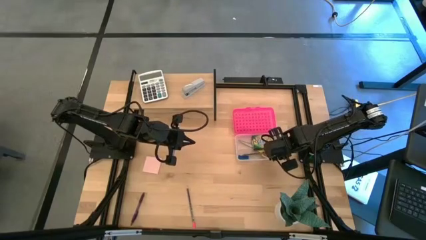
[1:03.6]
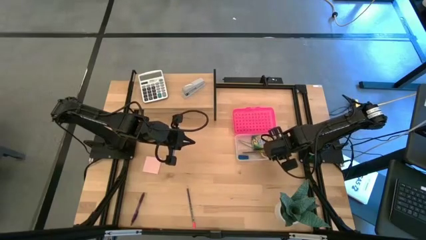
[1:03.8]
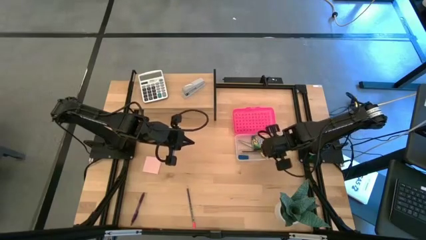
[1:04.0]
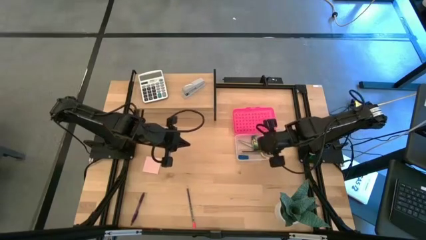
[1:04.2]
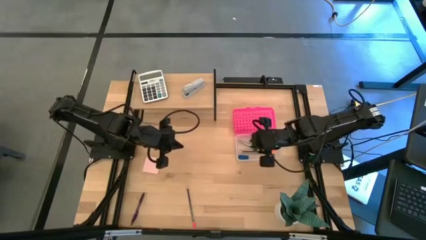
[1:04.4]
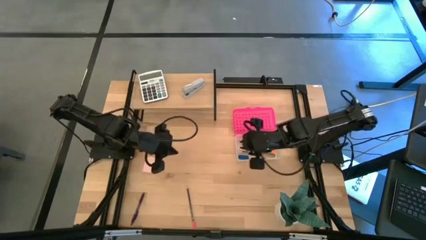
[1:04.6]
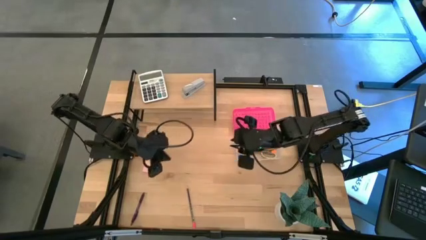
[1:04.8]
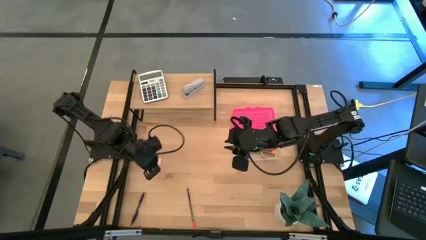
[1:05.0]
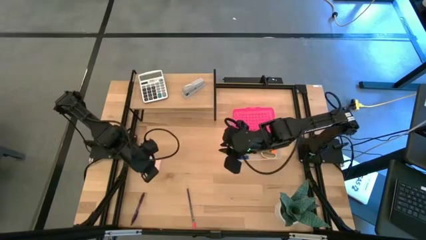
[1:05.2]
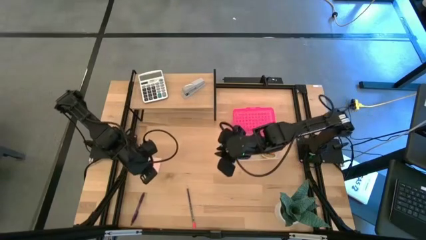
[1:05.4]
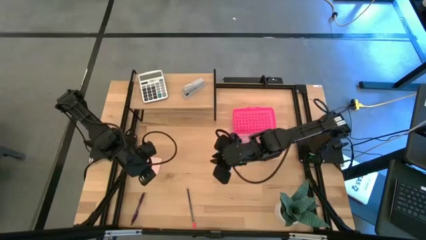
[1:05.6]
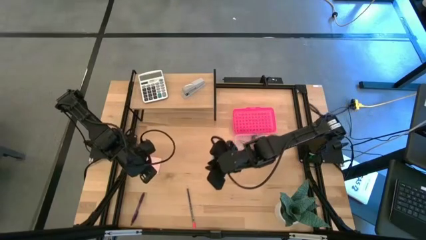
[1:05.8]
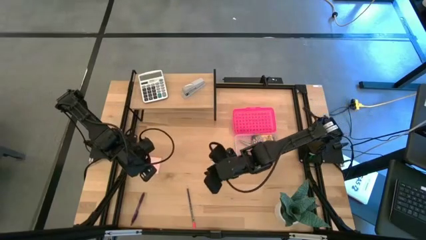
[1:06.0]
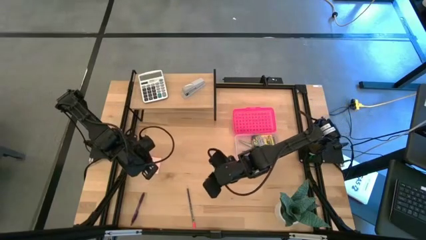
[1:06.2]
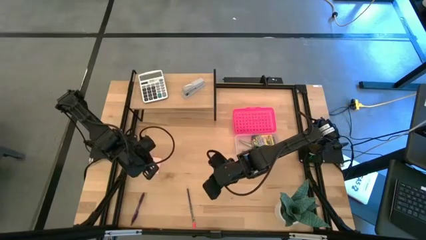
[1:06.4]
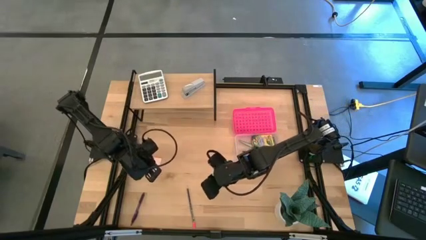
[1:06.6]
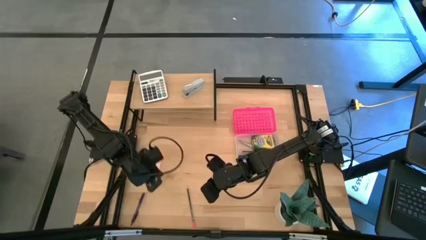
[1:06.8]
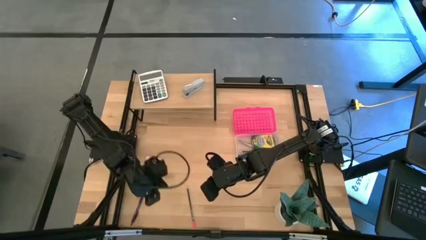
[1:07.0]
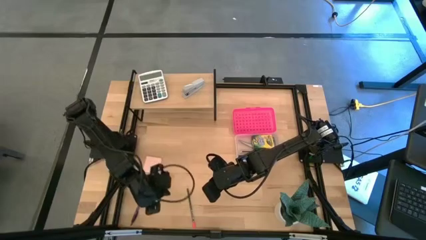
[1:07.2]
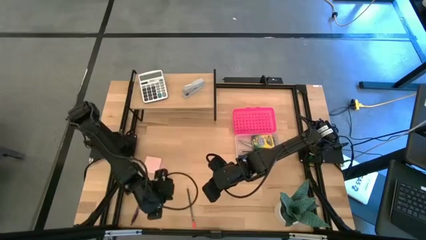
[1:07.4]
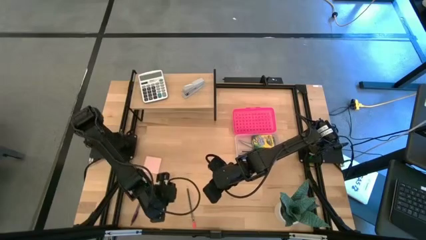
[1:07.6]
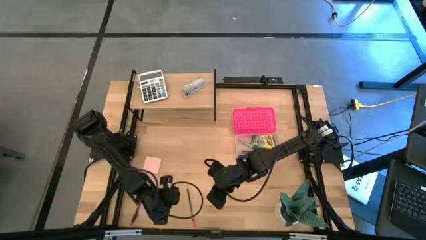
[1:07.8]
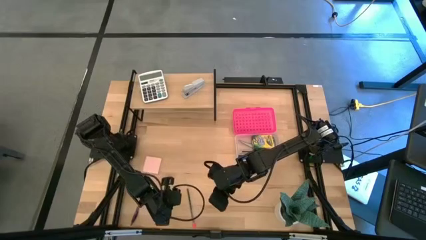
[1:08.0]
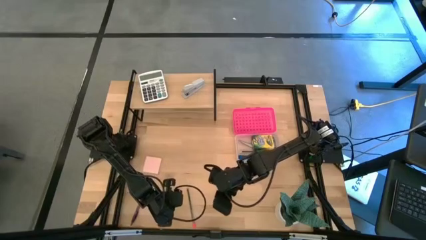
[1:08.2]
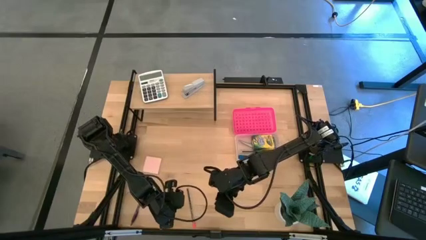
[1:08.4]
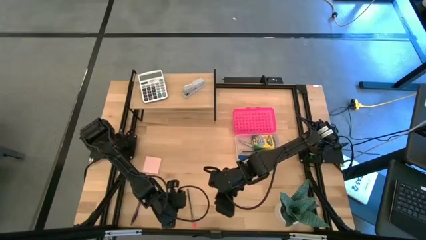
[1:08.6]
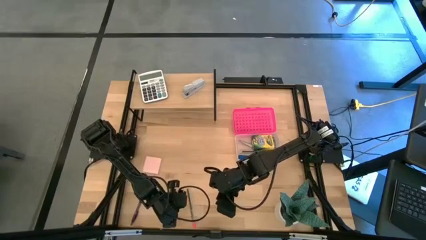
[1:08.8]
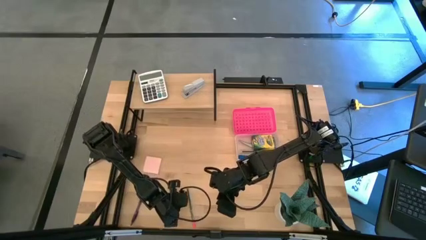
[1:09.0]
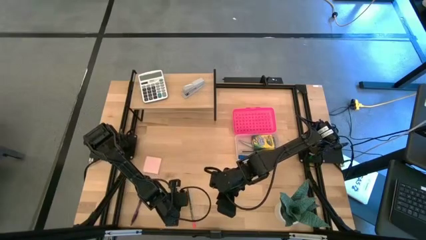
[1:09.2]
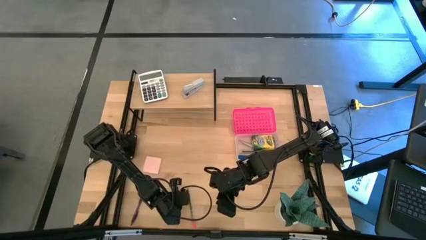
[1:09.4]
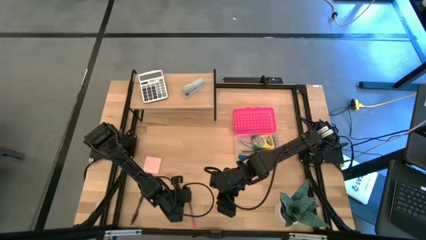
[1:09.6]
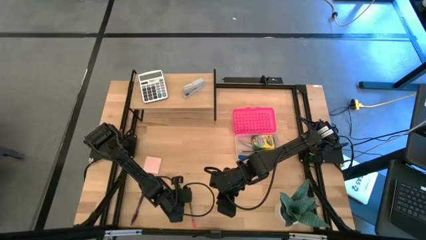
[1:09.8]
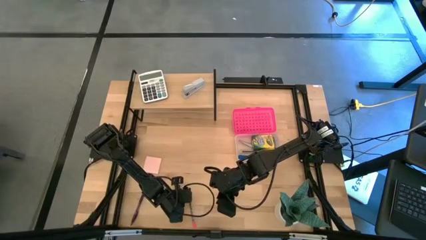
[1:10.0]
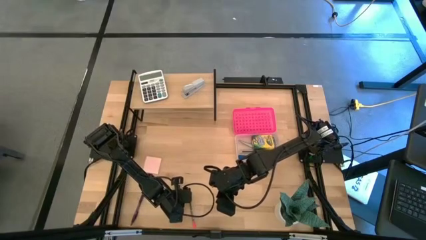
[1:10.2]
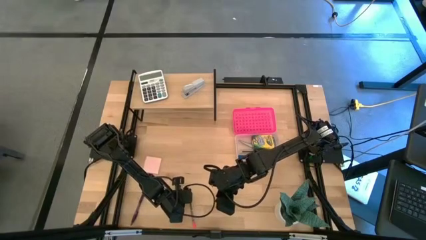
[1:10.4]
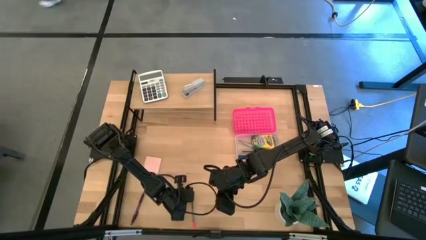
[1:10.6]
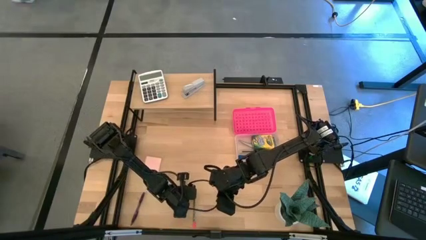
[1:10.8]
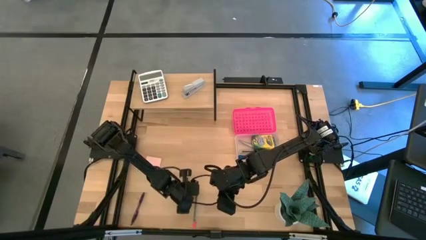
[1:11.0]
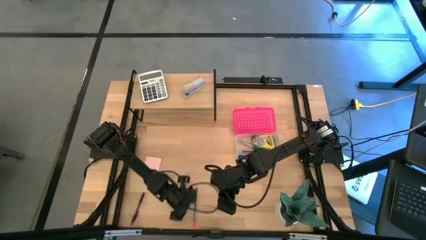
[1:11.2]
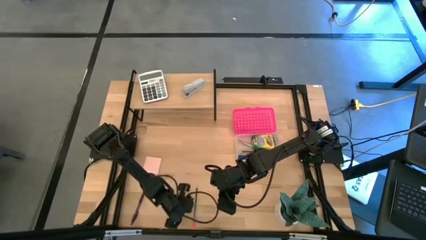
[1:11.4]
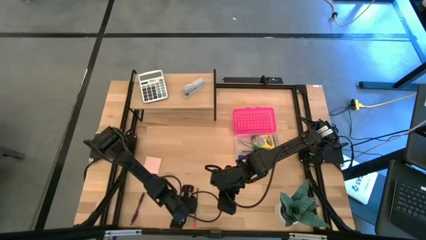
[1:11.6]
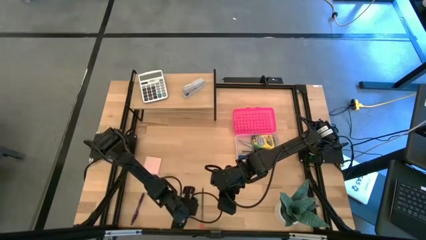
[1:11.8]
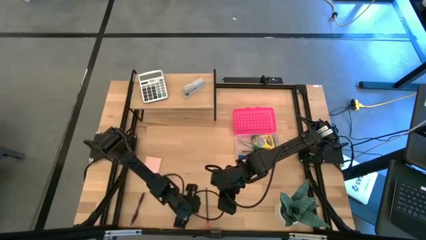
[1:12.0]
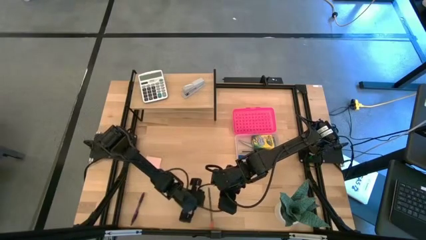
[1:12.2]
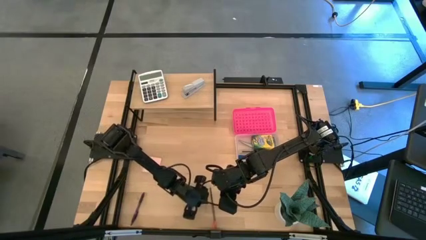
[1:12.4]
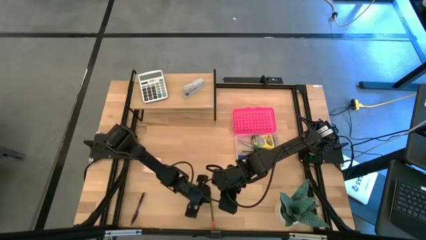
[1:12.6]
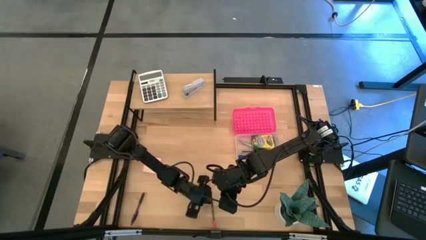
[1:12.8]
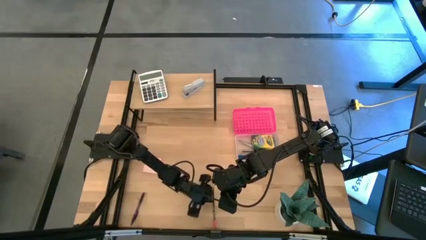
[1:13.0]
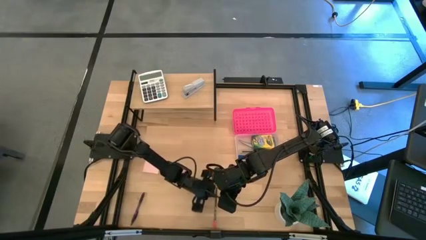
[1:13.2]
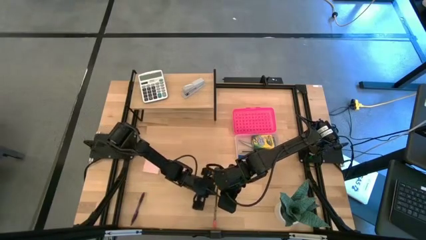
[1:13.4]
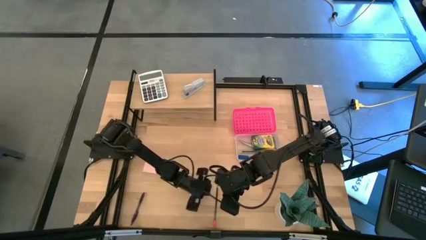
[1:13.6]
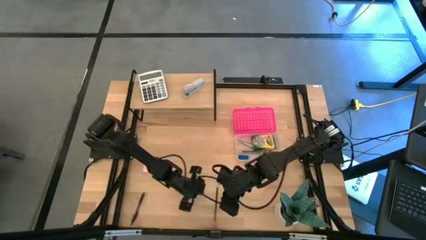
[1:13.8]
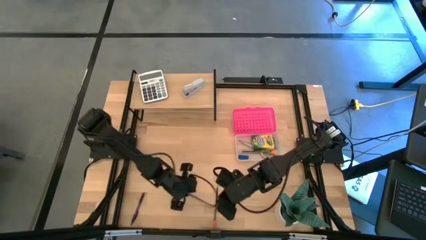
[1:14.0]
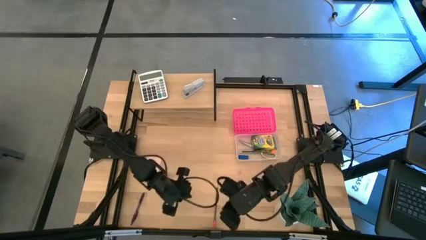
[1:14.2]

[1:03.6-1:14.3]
Task: Pack school essentials
Put the pink pencil into the pink supply box

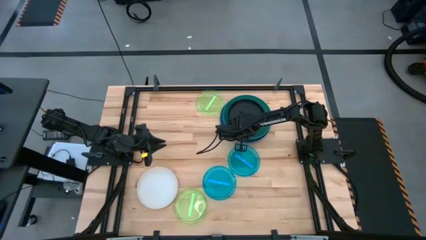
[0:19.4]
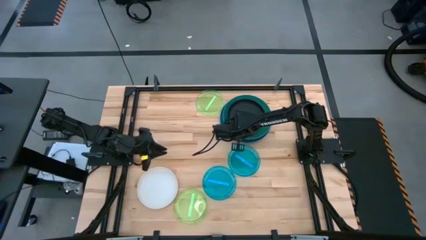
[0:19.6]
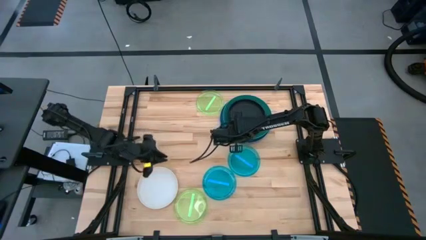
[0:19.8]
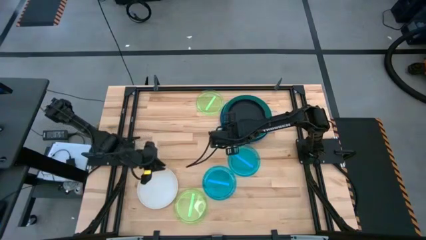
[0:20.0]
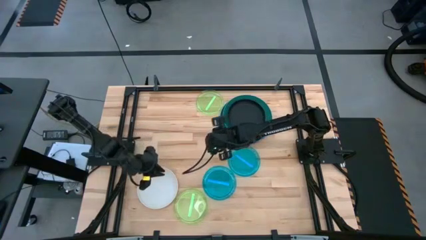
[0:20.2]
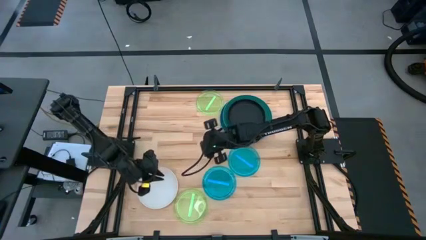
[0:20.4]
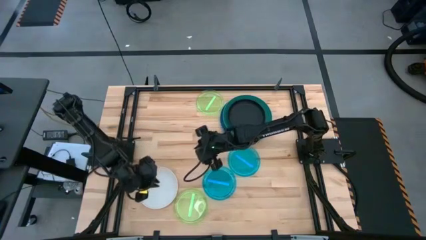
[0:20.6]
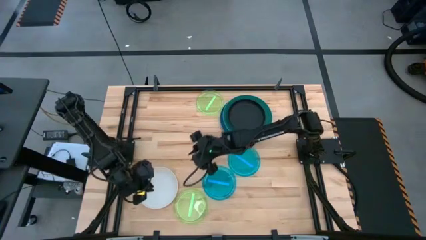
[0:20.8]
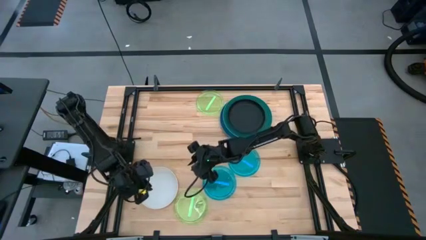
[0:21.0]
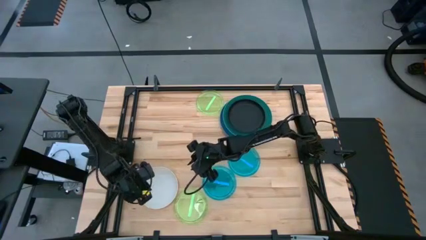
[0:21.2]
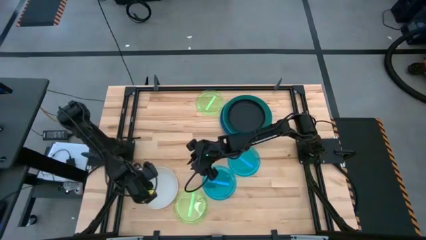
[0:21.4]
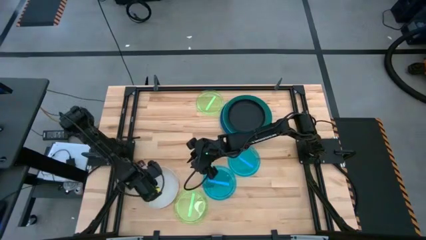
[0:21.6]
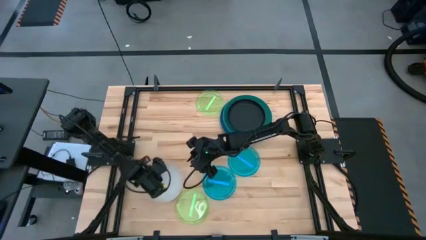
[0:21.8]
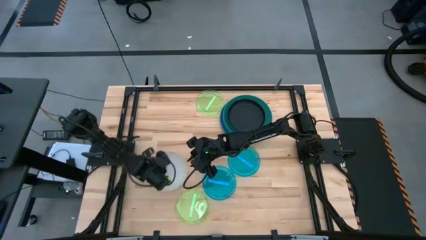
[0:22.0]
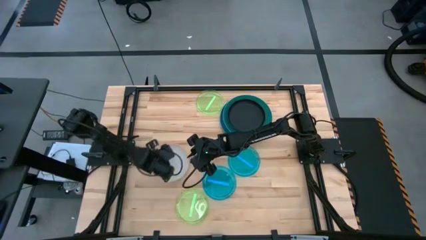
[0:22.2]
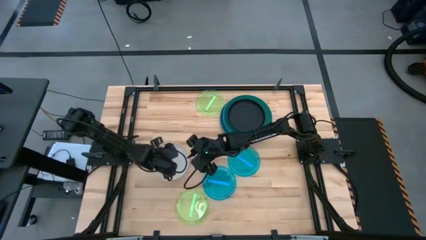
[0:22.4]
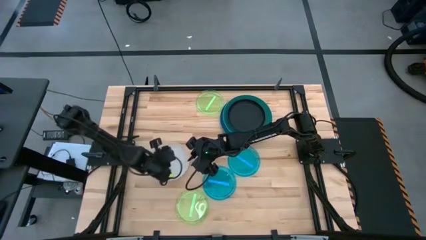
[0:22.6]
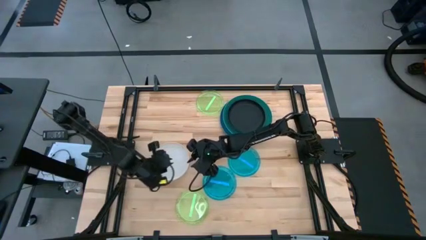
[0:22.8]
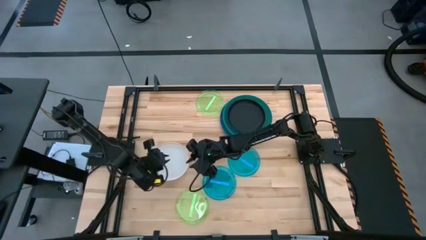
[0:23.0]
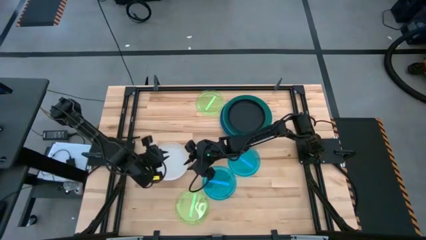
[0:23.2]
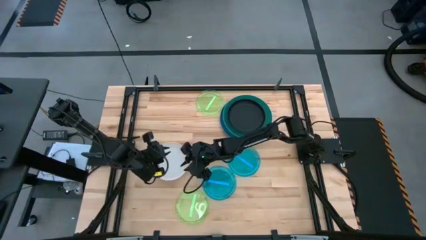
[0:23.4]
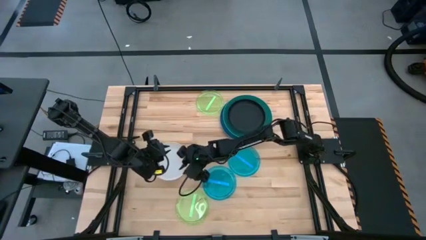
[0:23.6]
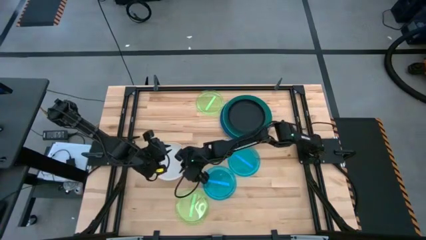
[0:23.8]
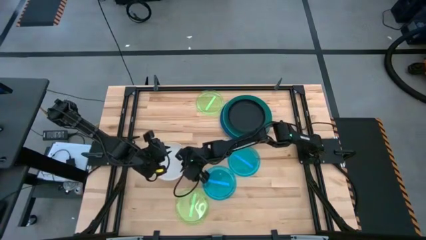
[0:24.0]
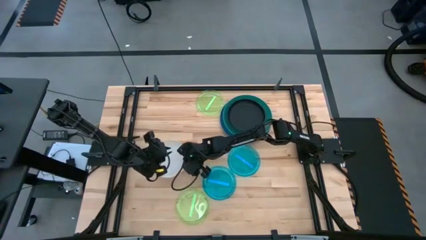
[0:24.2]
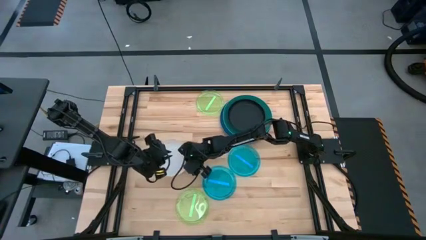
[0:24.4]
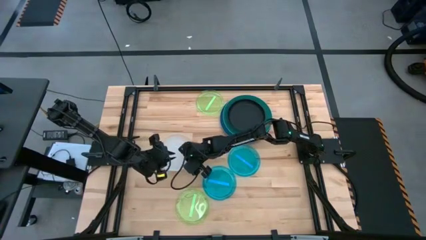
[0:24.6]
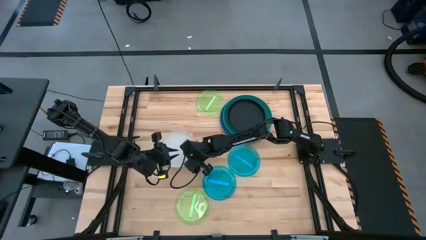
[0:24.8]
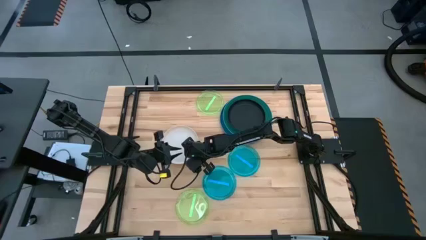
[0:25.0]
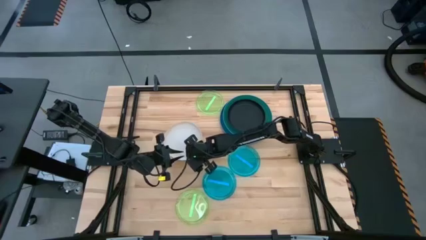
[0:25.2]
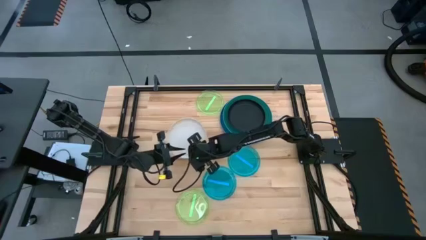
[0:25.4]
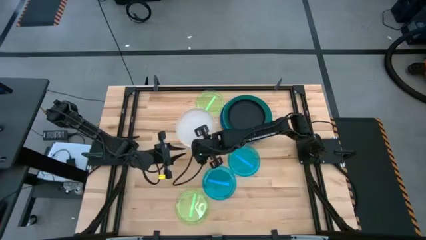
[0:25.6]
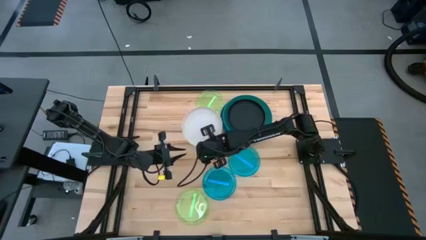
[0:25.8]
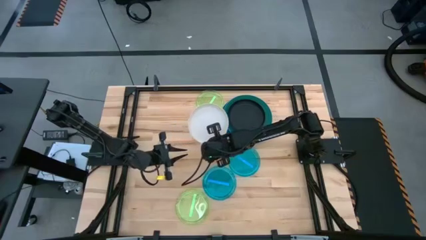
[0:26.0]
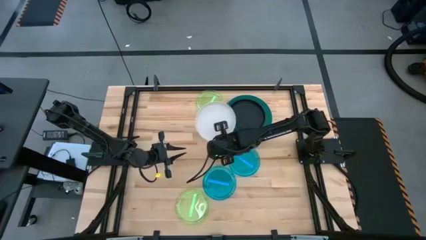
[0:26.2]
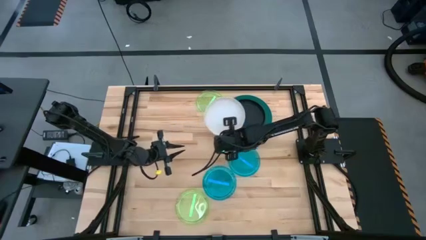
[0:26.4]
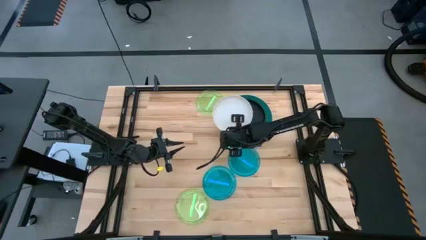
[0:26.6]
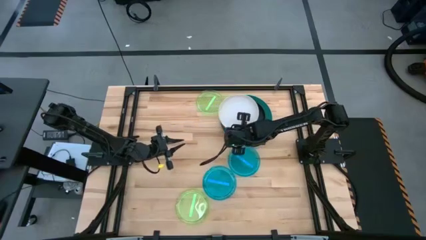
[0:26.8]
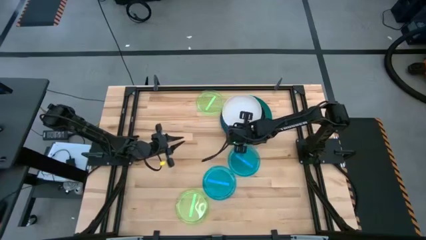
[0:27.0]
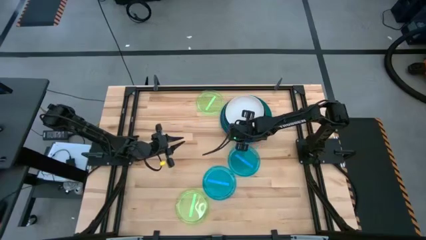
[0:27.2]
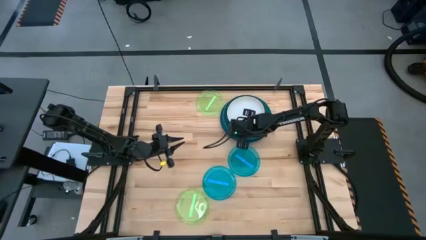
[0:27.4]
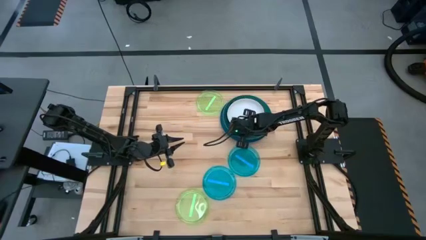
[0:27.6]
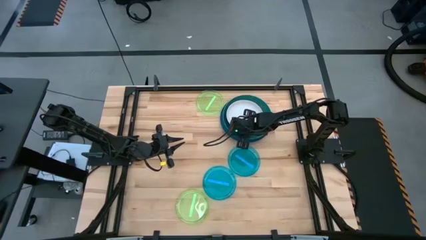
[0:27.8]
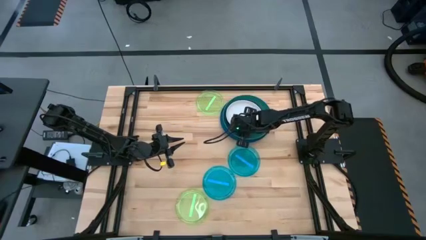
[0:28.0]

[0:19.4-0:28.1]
Task: Stack plastic plates
Stack the white plate on top of the black plate
